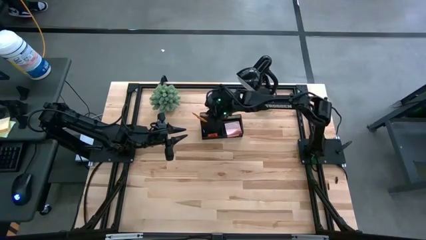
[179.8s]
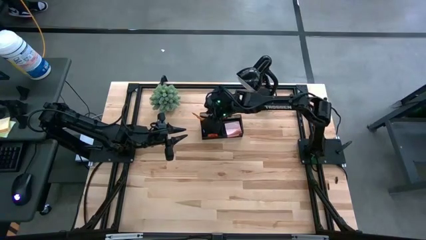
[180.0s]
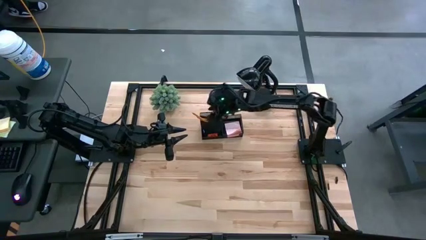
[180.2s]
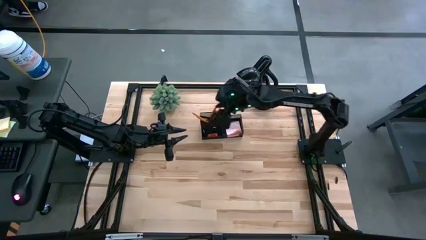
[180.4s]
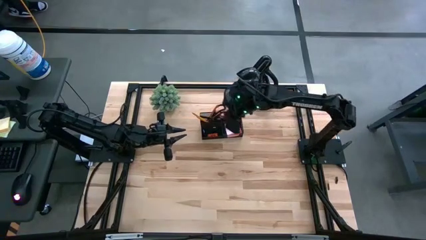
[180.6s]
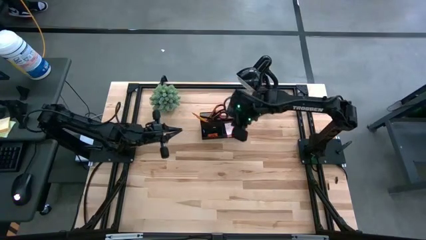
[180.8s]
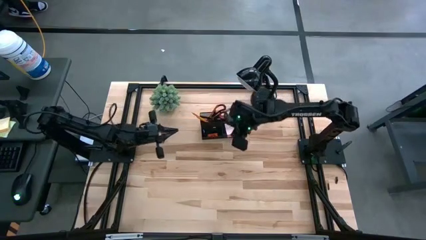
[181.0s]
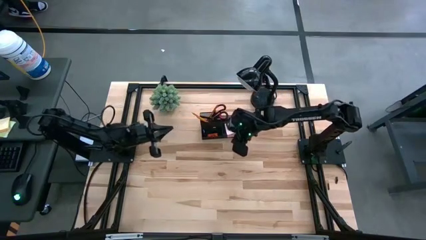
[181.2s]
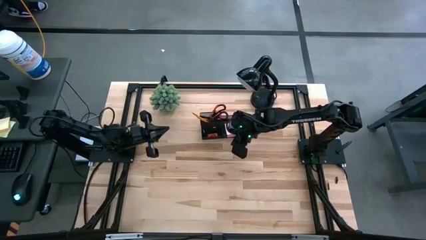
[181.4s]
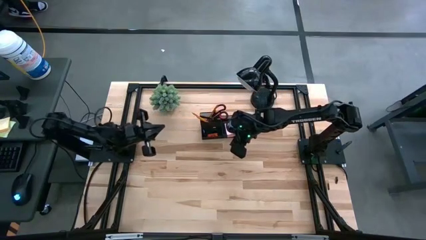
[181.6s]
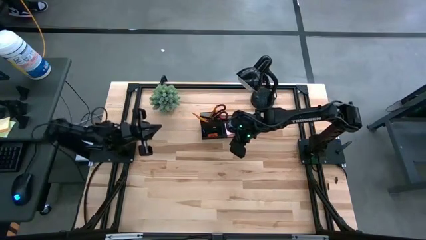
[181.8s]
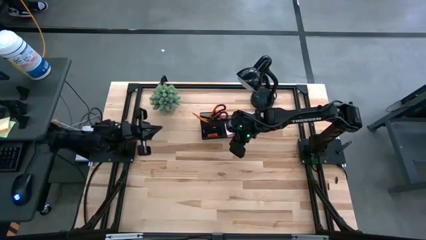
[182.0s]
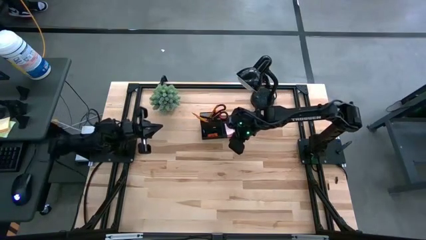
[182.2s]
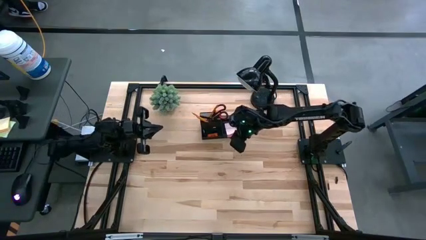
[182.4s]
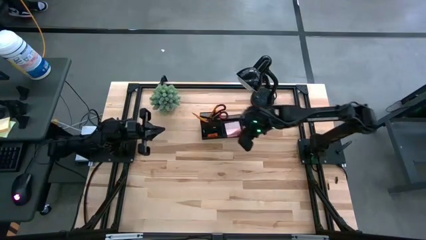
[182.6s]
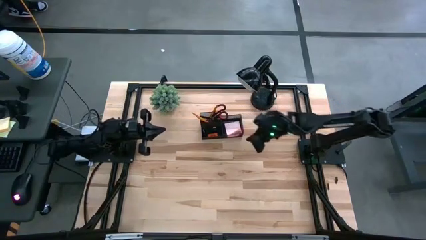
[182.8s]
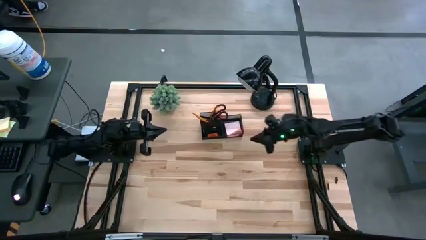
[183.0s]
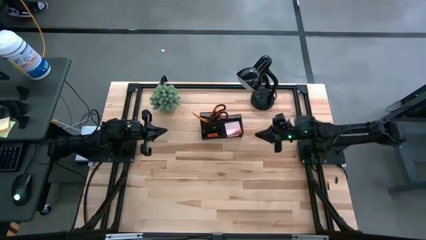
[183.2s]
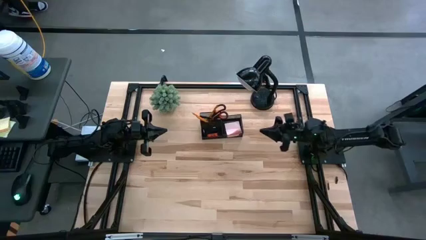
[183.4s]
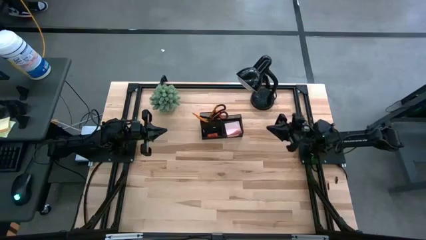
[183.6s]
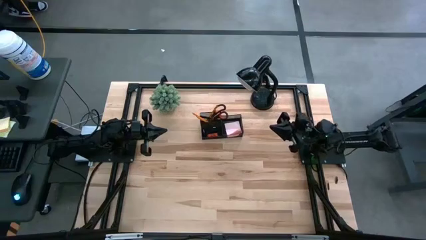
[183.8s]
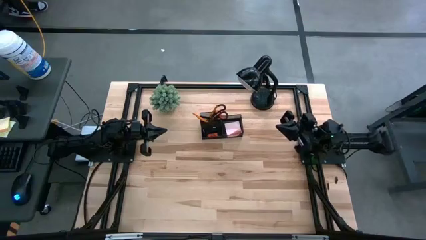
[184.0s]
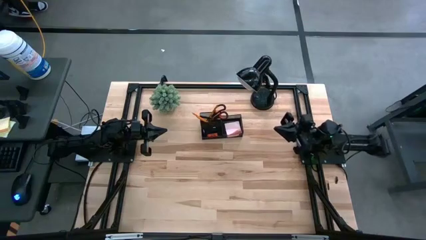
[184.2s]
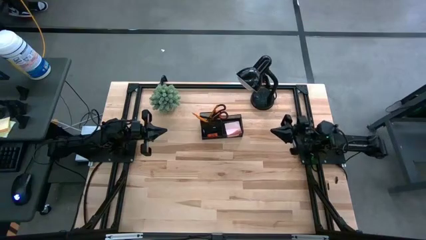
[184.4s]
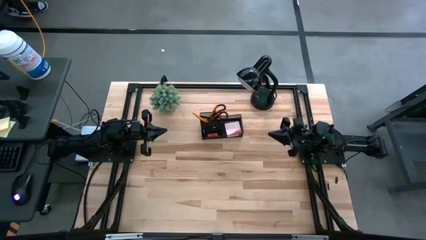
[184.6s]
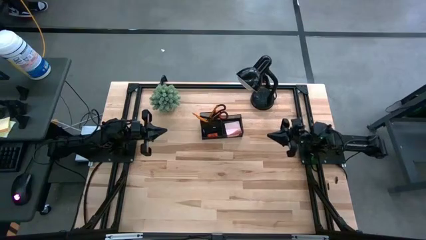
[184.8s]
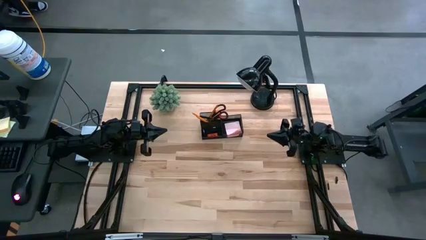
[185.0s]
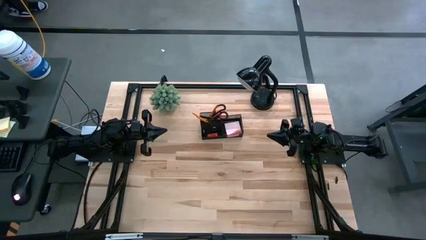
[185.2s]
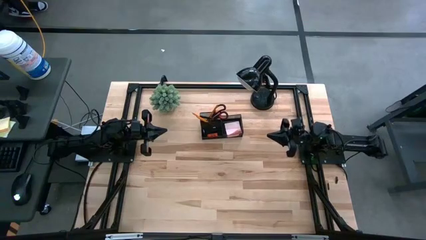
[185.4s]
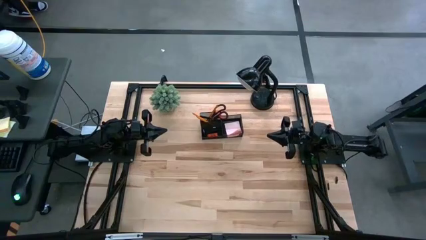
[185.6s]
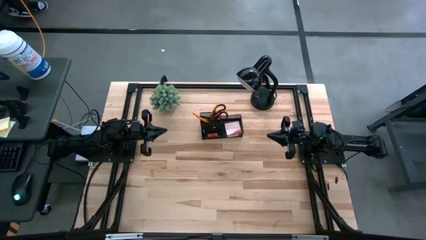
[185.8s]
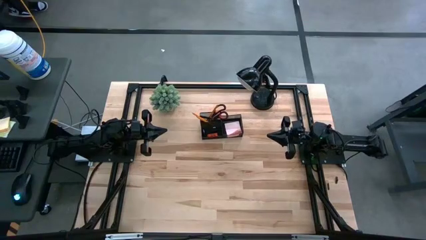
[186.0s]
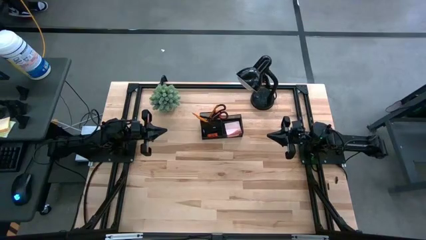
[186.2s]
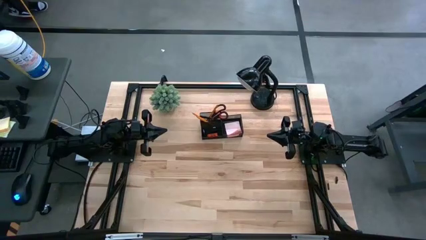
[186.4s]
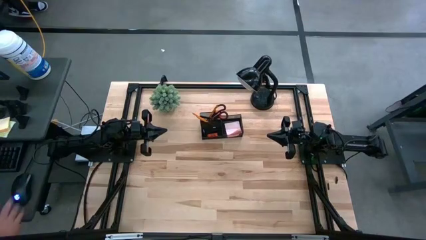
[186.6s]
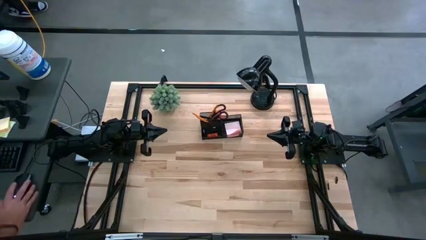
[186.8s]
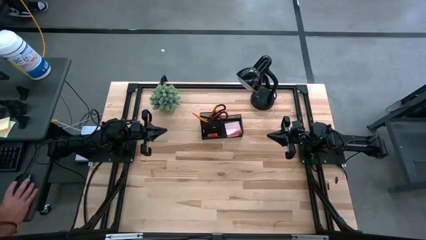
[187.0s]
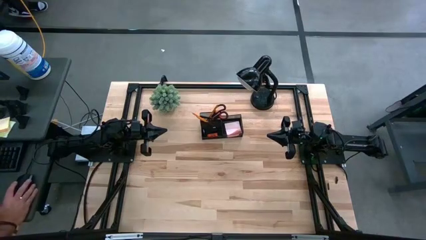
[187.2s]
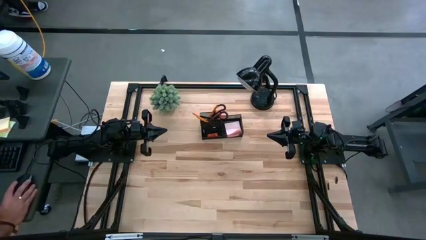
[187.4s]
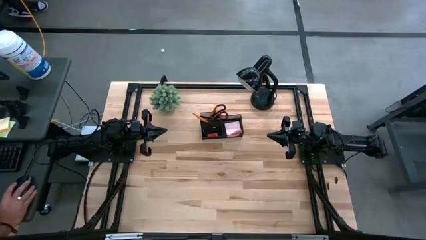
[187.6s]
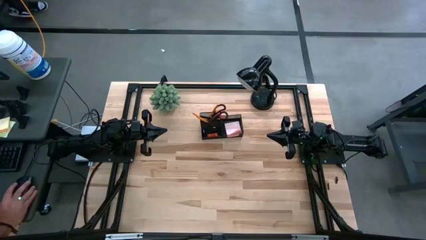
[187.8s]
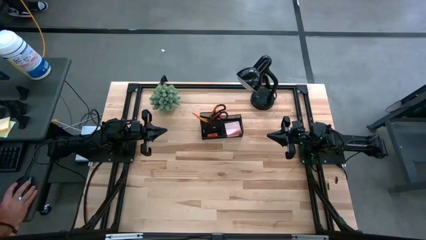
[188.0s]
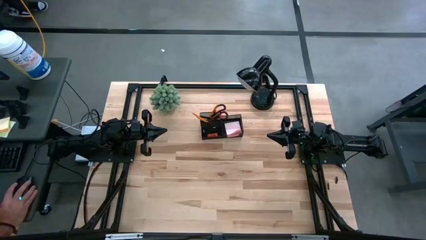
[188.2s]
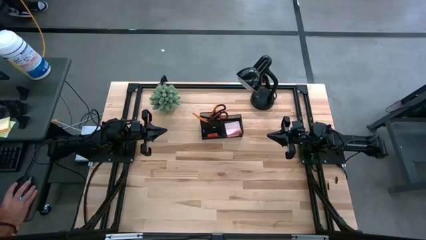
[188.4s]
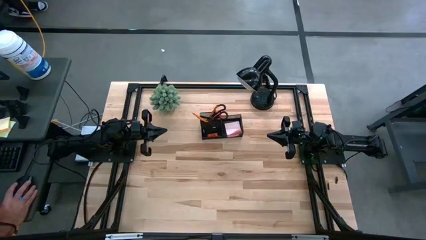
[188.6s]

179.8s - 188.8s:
Task: Pick and place office supplies into organizer
Return to Home Position

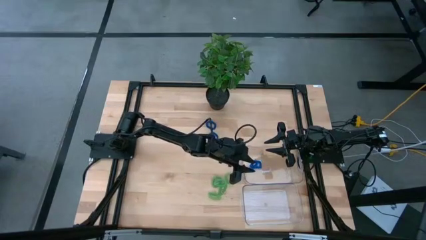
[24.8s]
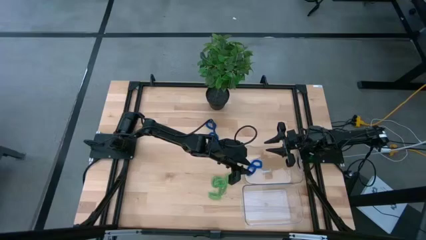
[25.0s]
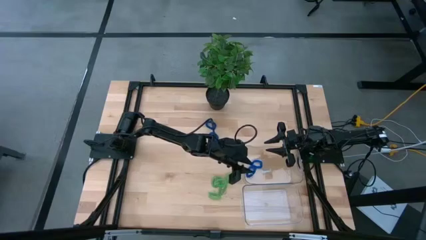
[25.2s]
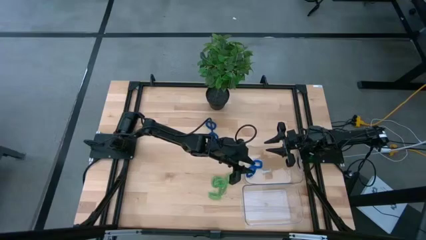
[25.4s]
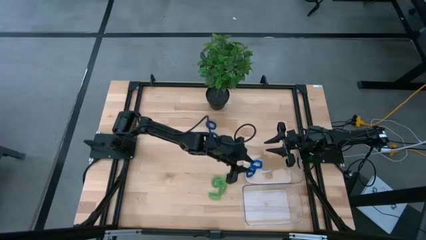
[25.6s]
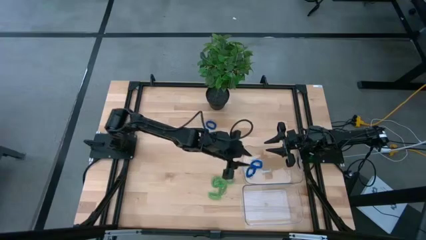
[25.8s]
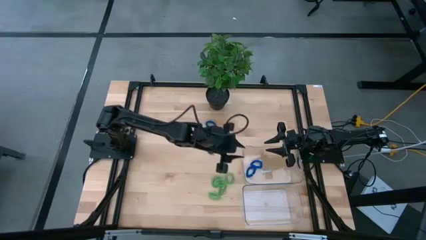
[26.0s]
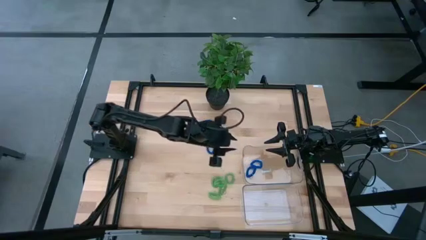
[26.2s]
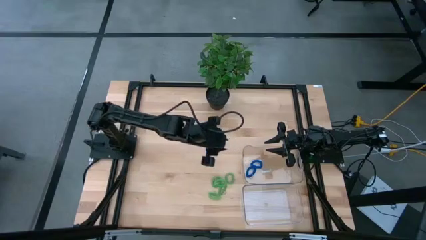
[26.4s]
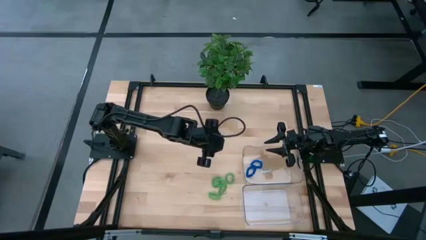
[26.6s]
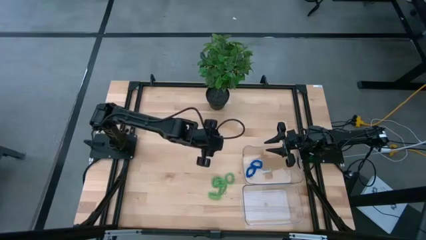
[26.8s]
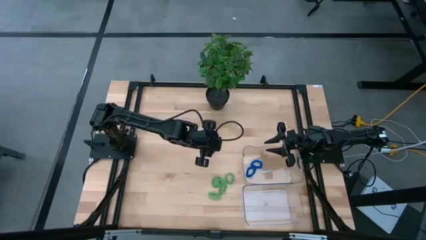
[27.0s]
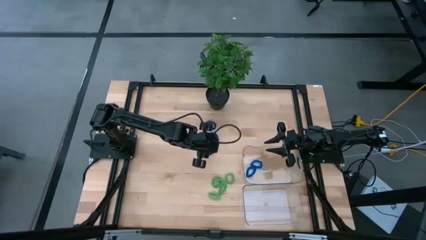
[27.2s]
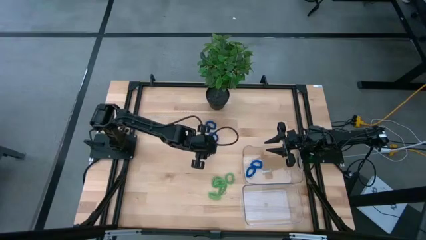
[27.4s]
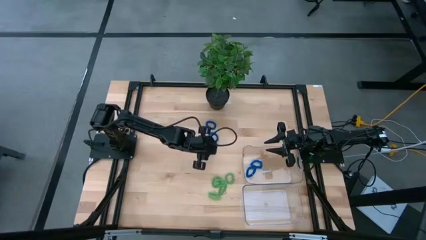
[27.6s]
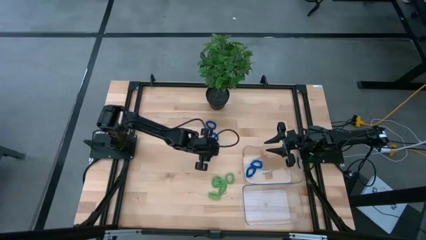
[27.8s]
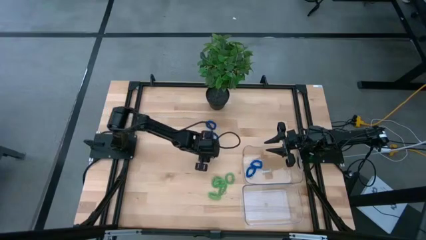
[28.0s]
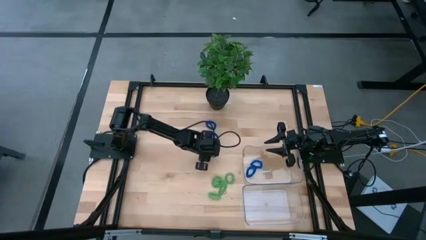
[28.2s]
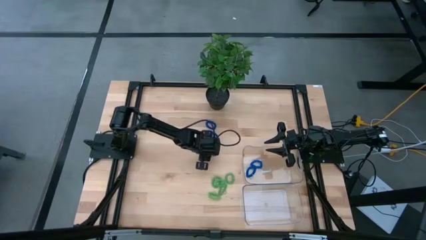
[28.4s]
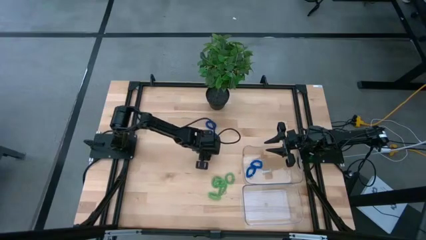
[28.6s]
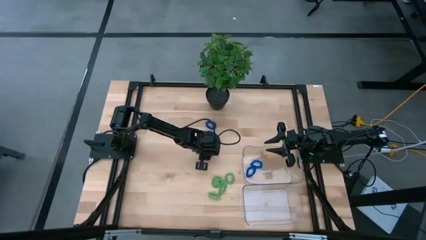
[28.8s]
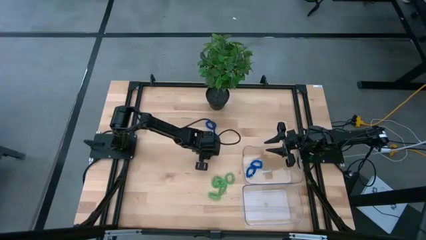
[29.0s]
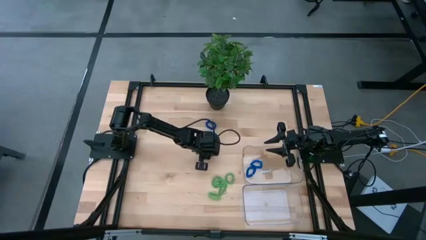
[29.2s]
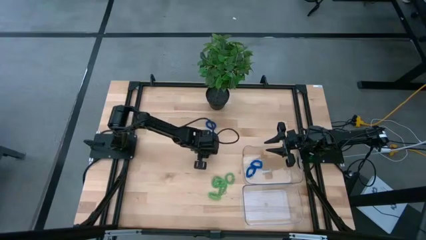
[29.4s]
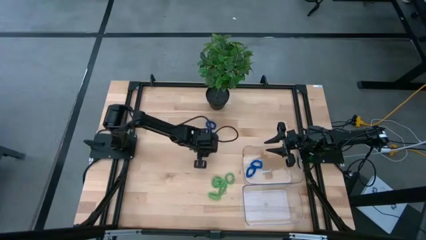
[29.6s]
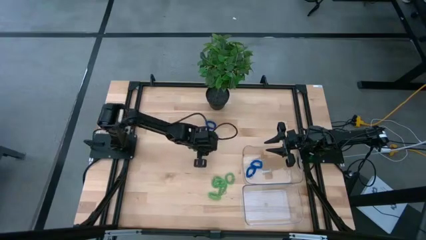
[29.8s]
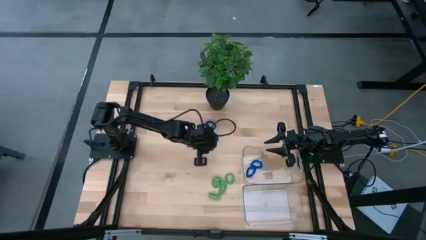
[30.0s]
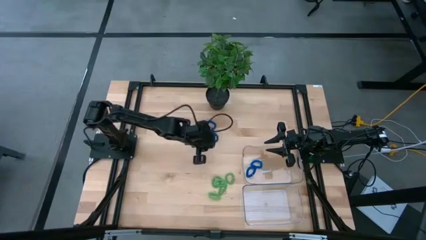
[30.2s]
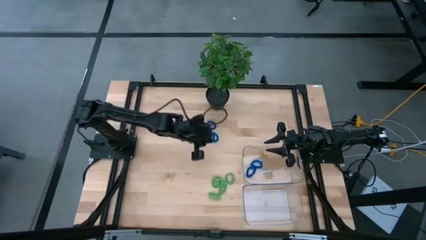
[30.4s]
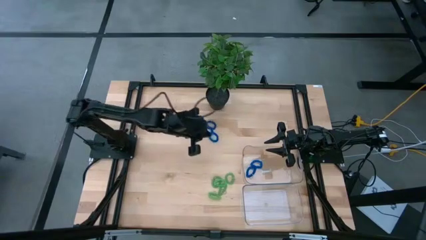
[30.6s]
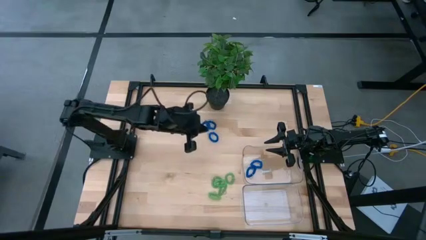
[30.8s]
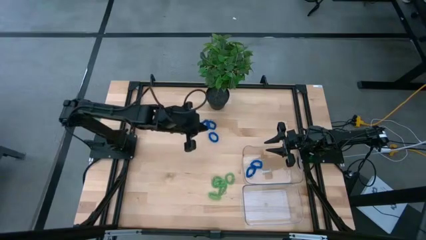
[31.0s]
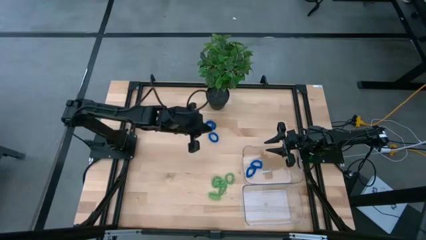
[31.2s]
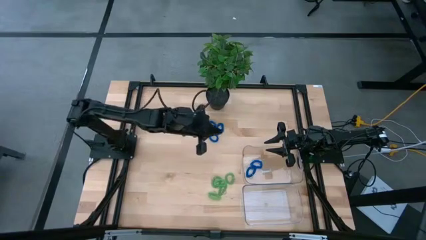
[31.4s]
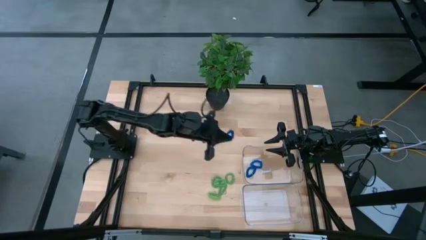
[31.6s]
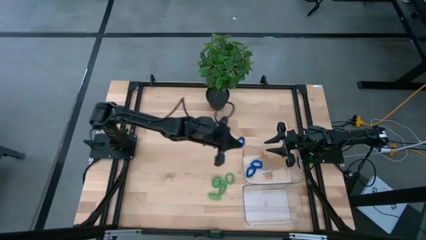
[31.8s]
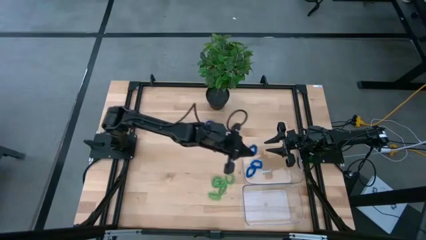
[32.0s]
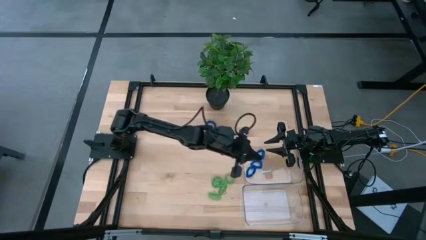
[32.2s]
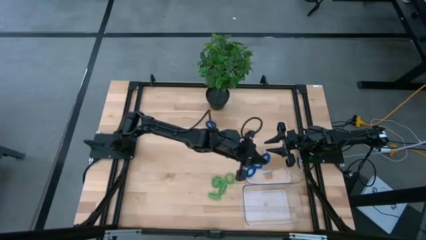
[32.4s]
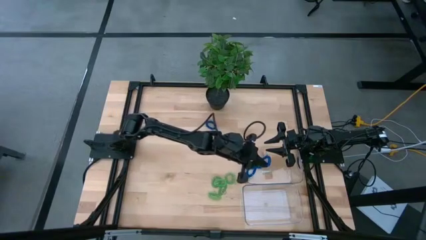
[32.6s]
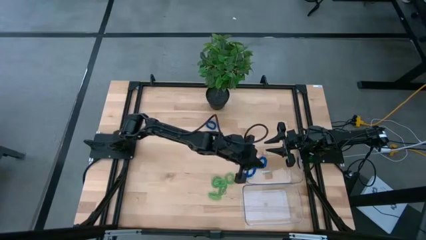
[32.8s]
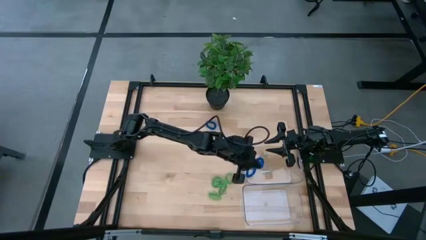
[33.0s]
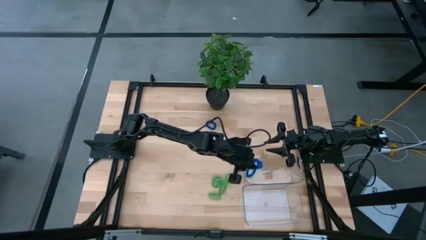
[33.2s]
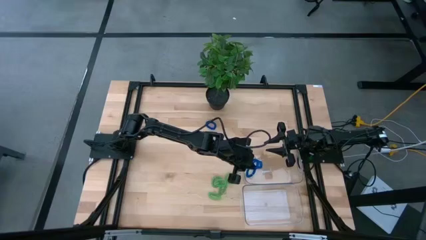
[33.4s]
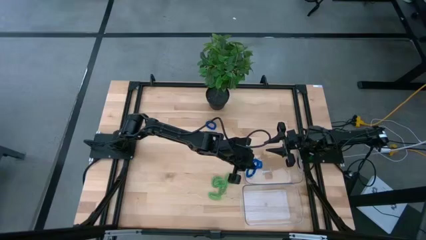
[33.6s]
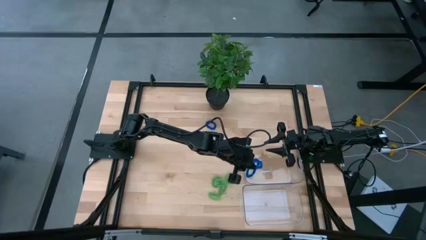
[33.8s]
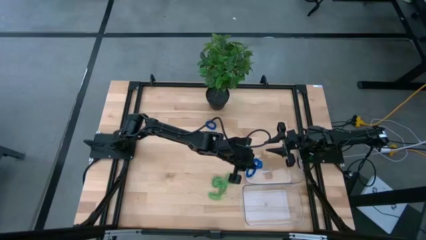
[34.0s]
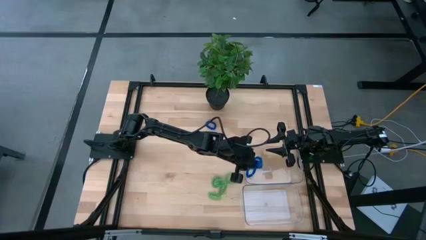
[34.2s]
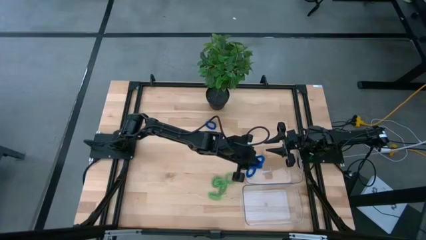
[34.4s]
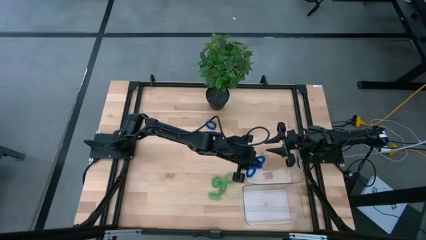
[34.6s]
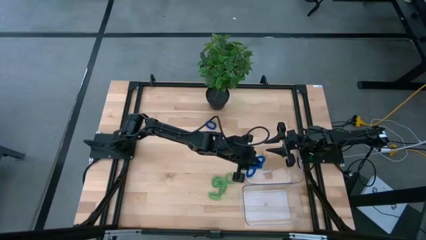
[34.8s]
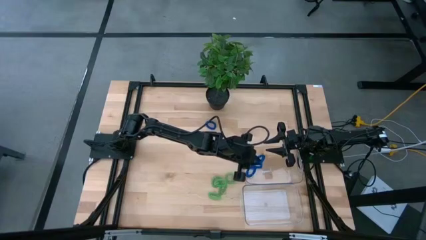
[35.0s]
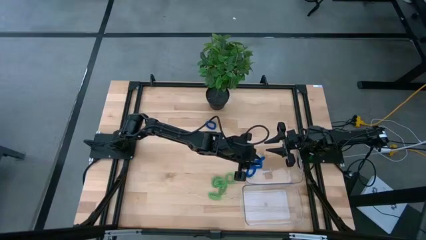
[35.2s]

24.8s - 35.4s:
Task: Sort spring keychains
Put the blue spring keychain in the top transparent bin
